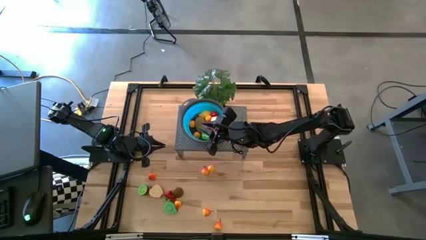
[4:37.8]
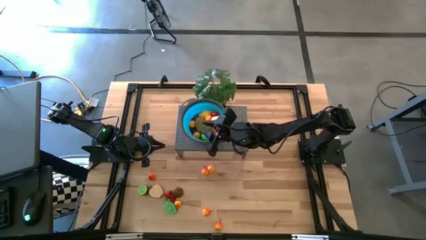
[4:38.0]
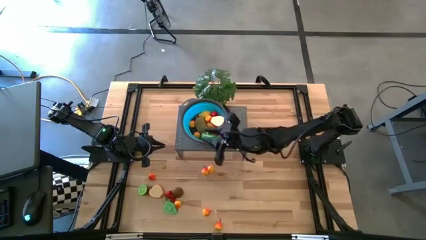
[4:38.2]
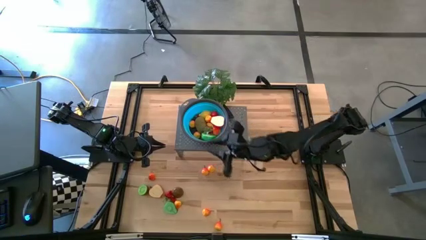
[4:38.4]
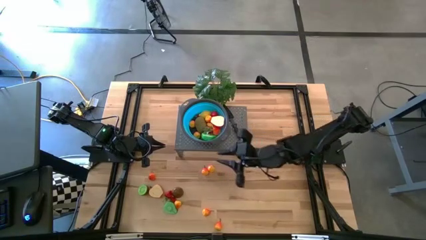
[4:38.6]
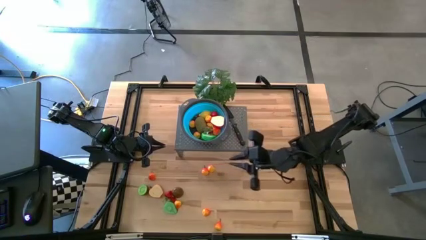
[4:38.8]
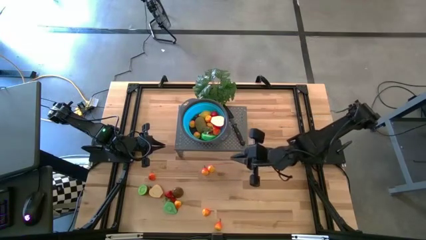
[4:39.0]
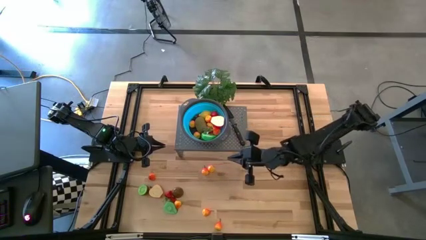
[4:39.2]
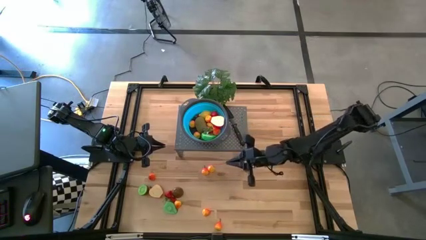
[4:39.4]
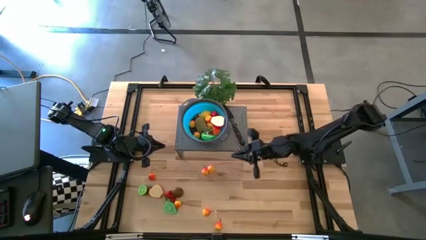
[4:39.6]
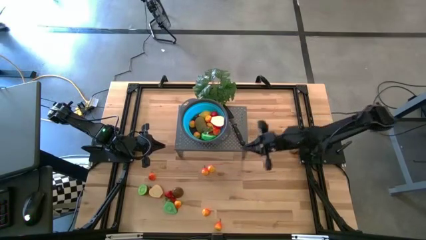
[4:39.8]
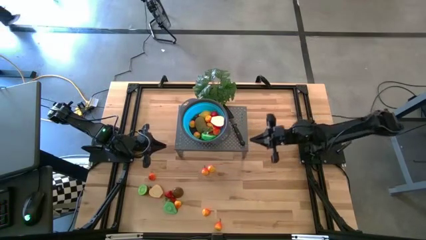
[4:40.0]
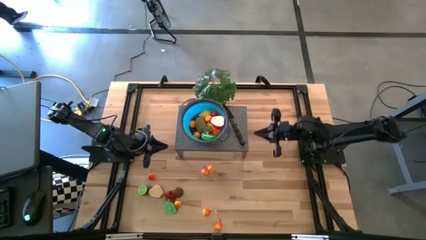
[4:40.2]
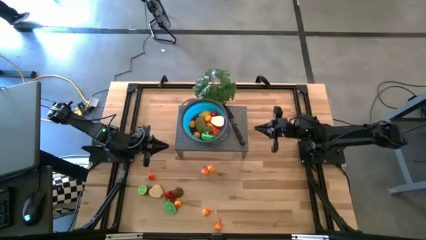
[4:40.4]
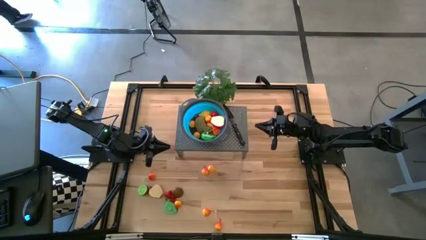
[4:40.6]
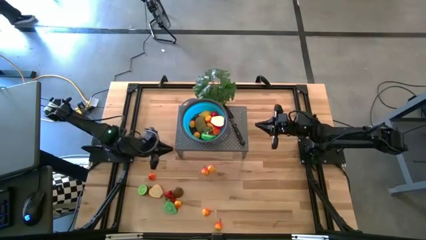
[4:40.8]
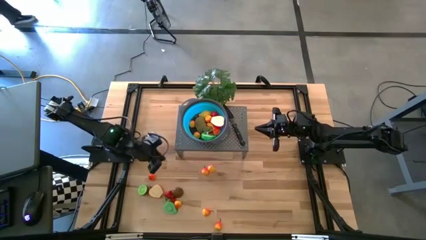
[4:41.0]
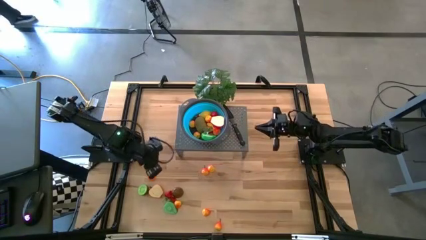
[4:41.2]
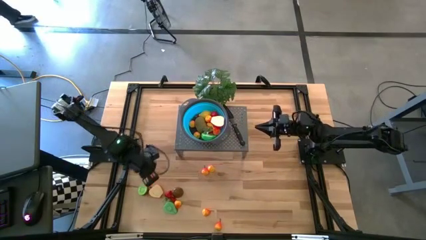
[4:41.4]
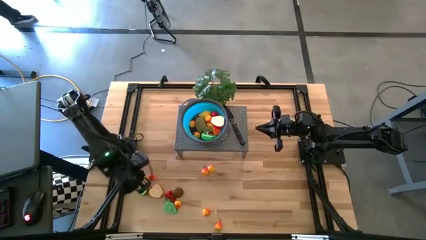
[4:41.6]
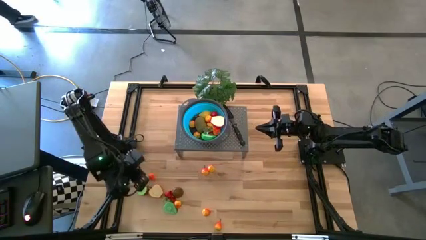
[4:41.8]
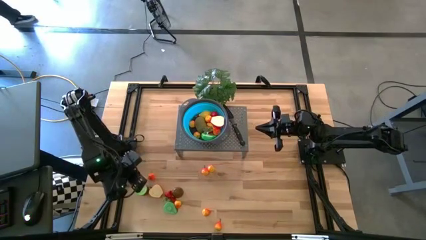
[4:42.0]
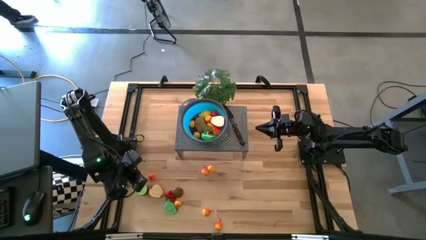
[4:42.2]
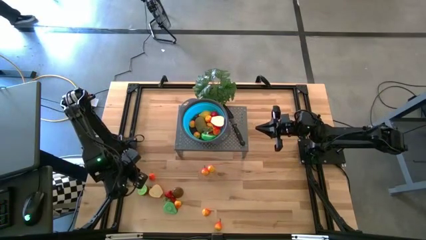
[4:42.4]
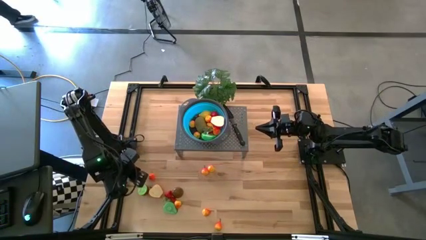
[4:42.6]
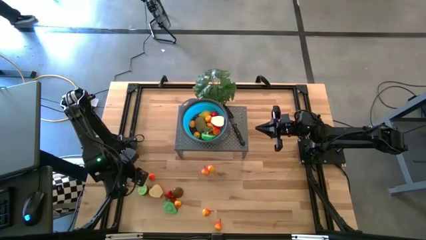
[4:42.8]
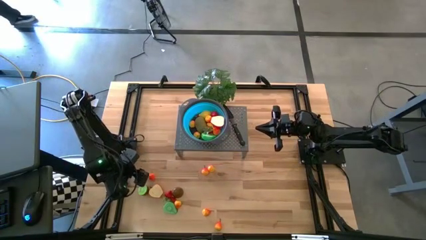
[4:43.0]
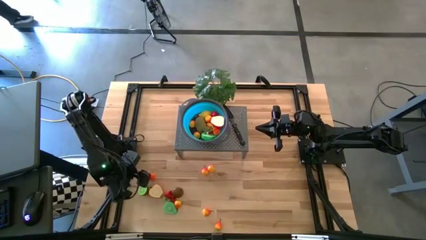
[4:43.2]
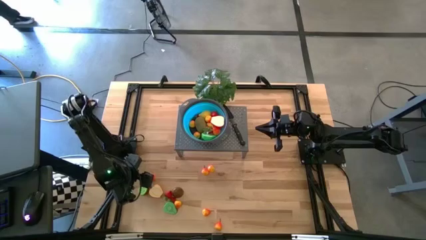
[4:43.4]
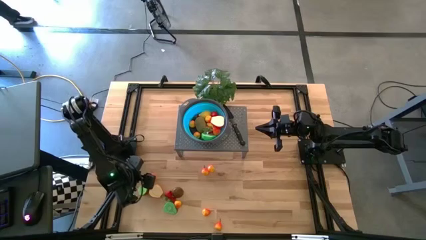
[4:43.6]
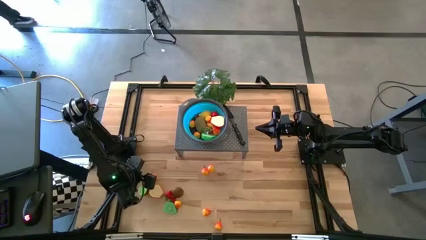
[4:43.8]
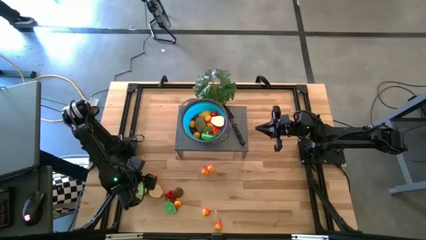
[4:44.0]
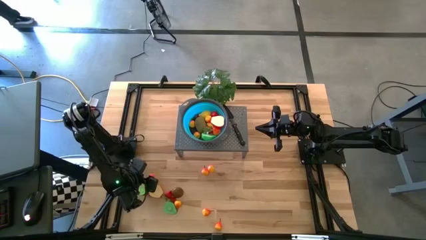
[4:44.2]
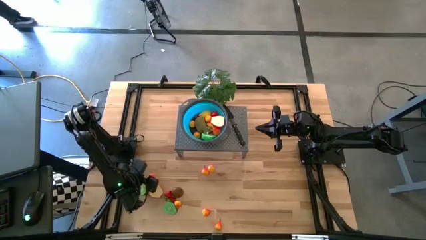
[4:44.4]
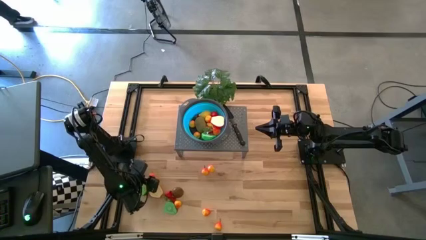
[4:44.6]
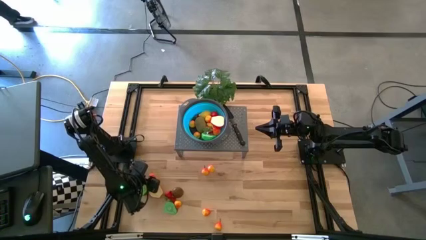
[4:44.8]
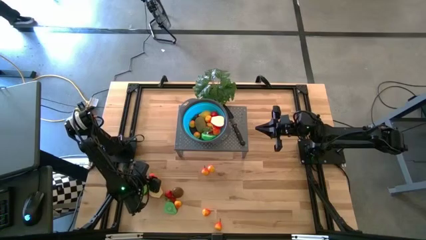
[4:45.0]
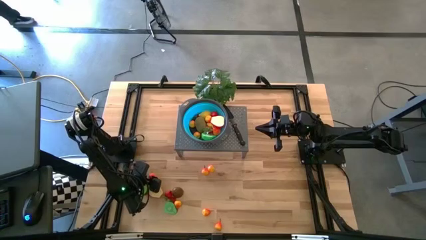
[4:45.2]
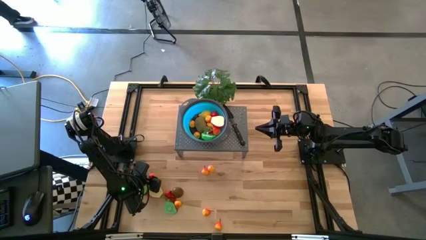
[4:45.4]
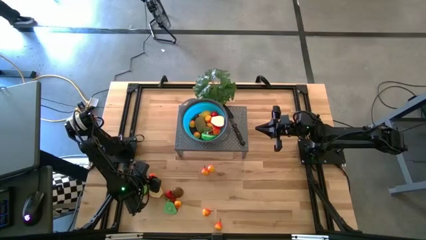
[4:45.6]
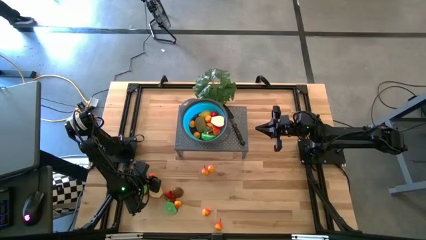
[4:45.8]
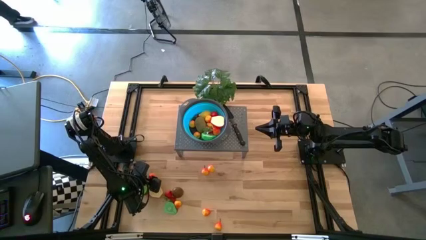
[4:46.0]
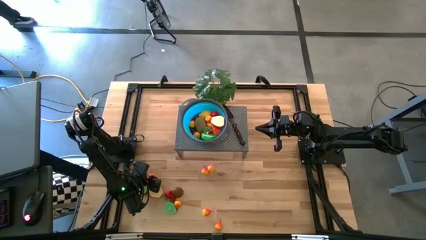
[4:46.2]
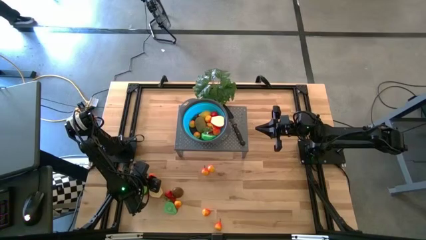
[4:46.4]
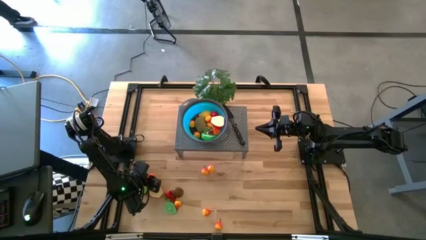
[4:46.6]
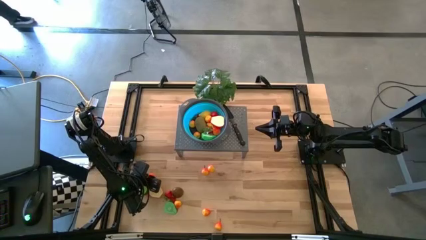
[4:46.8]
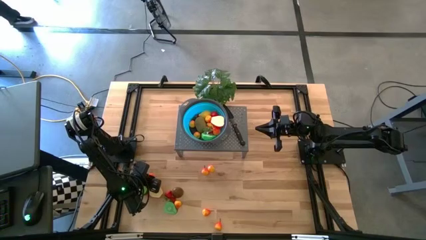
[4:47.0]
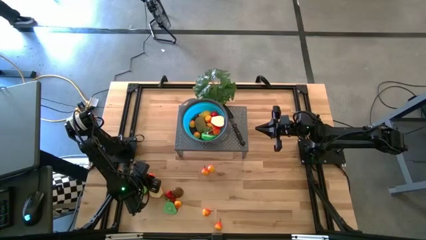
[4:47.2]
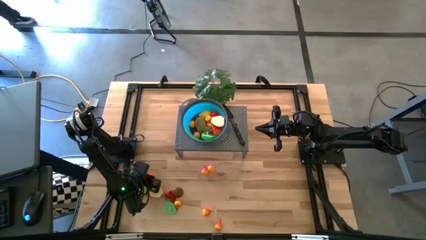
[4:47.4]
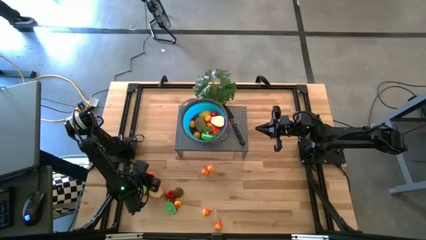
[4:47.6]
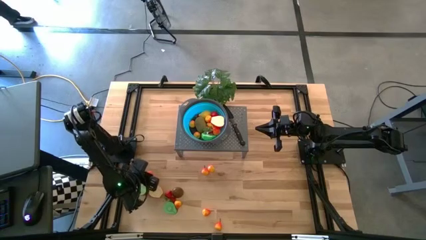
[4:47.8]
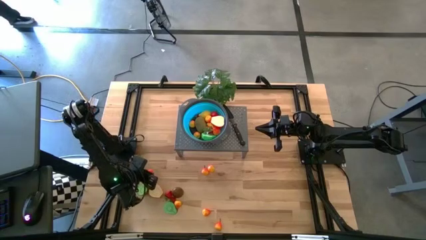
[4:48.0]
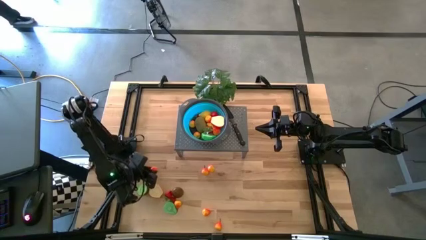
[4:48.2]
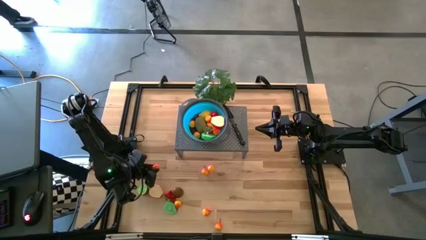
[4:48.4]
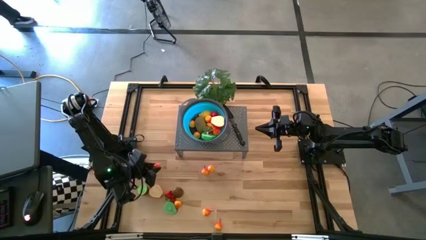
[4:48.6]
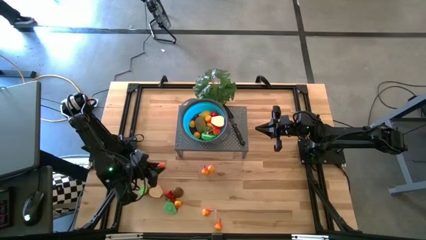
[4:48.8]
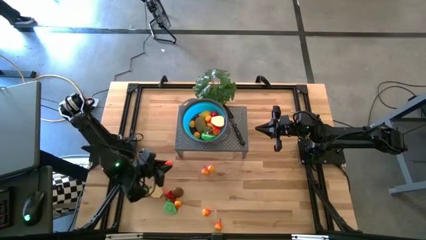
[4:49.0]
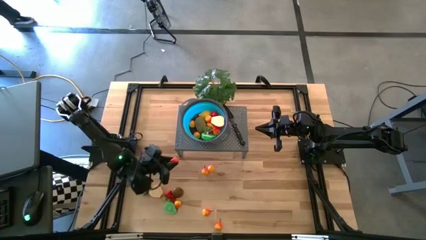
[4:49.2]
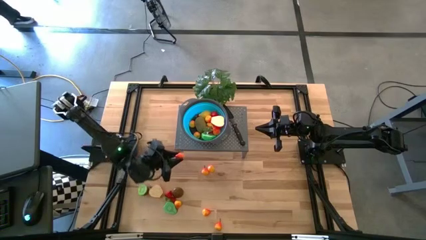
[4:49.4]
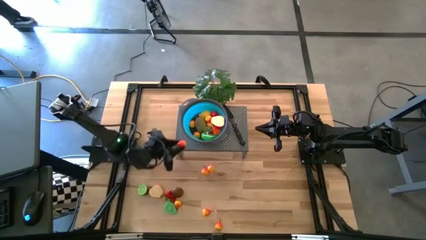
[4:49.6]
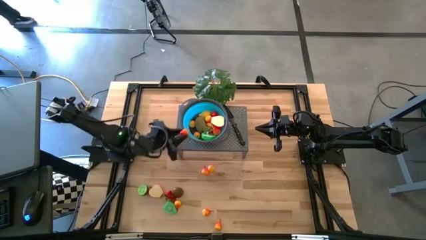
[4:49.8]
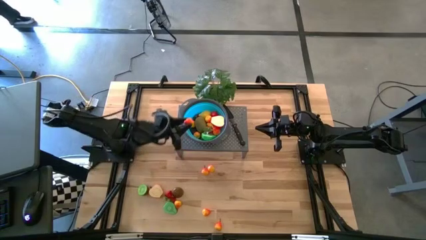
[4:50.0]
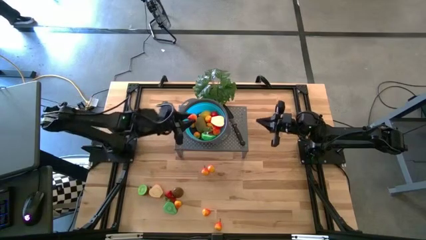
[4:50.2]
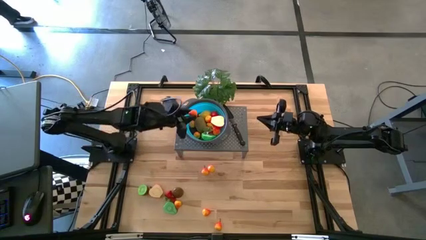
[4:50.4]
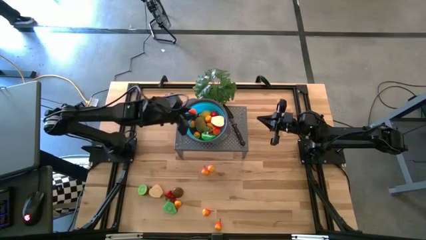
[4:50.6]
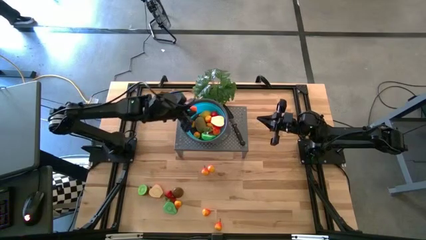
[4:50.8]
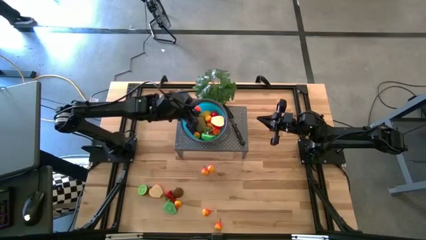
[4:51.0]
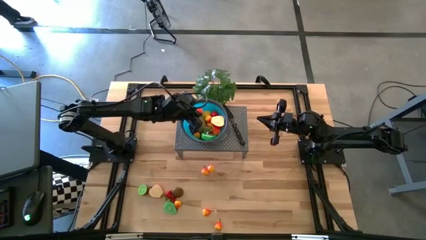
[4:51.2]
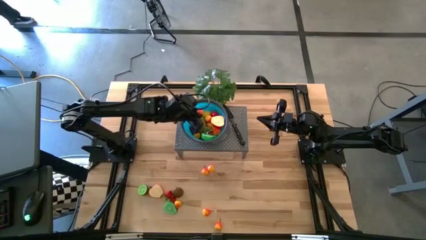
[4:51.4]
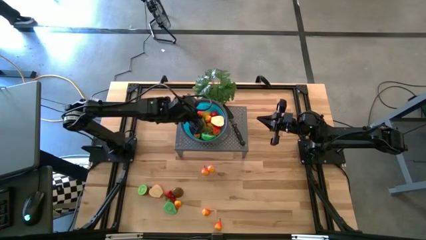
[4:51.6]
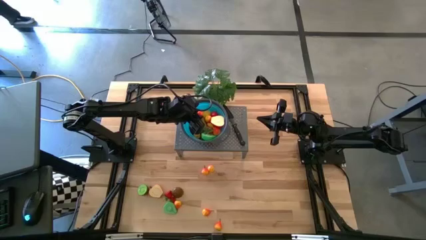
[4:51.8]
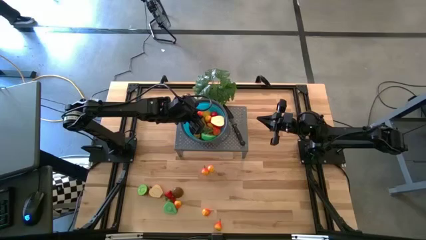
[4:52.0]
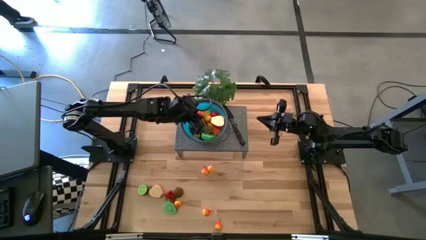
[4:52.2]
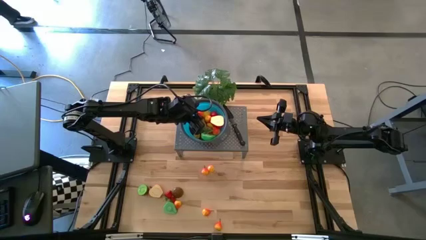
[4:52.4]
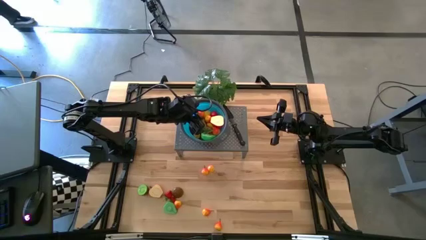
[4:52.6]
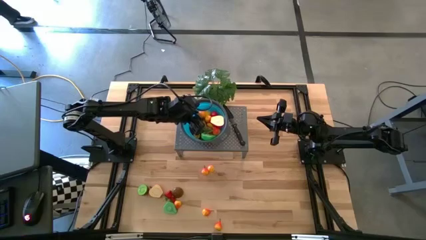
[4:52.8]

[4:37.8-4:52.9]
Task: Pick & Place Fruit
Put the strawberry into the blue strainer bowl on the shelf
